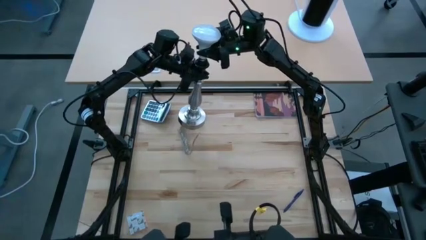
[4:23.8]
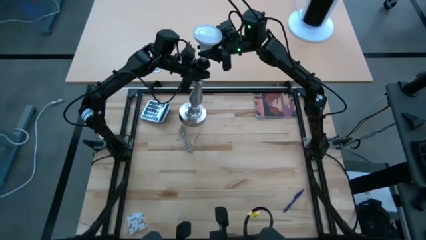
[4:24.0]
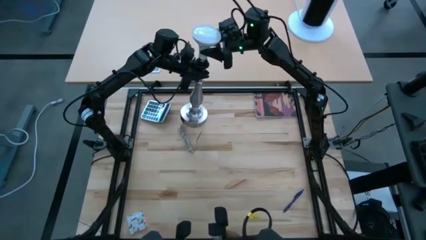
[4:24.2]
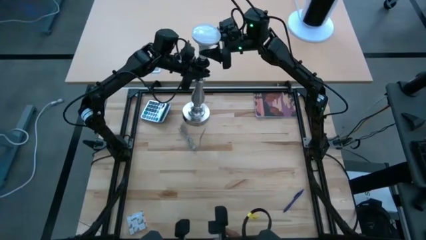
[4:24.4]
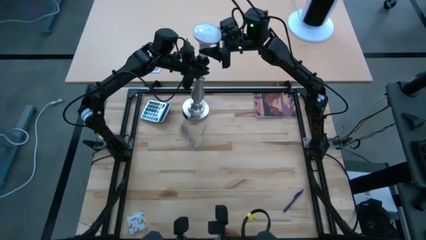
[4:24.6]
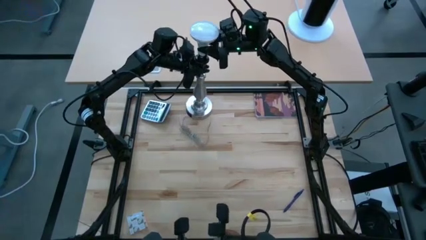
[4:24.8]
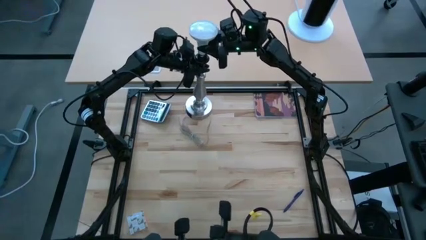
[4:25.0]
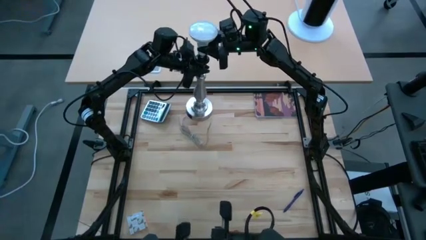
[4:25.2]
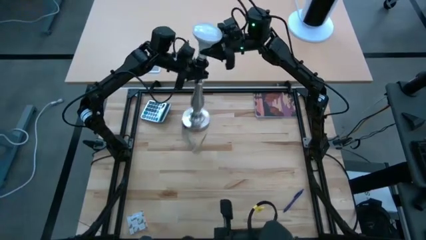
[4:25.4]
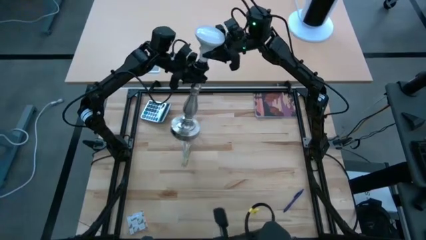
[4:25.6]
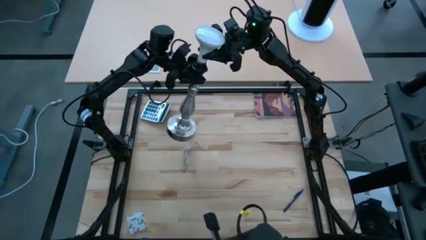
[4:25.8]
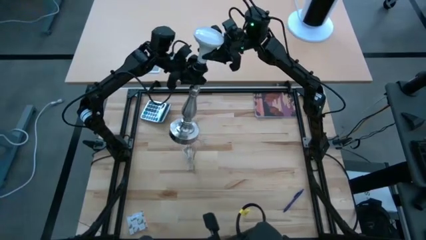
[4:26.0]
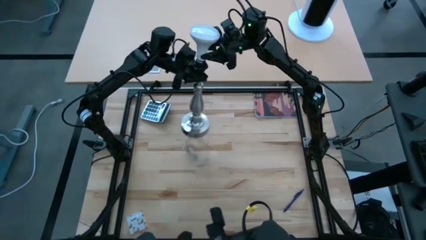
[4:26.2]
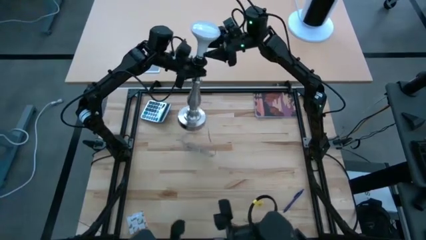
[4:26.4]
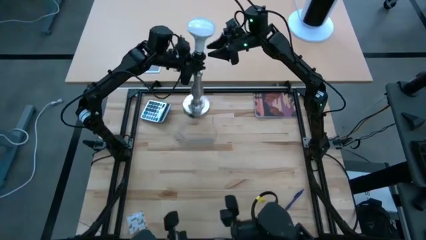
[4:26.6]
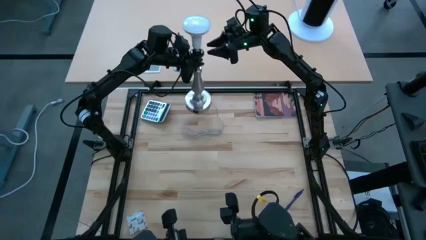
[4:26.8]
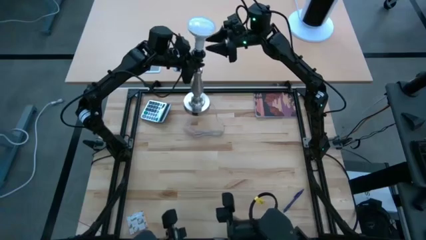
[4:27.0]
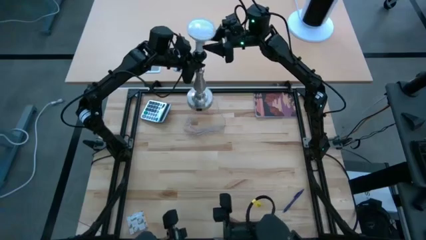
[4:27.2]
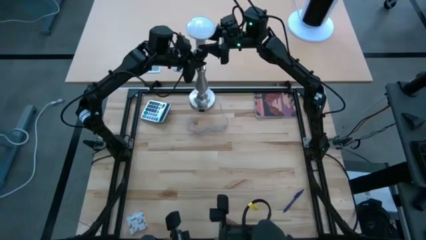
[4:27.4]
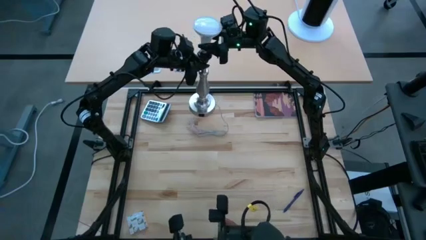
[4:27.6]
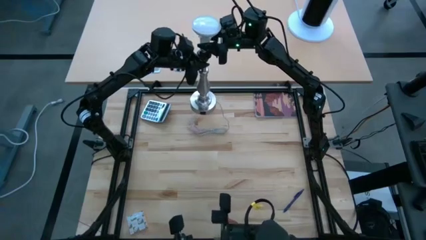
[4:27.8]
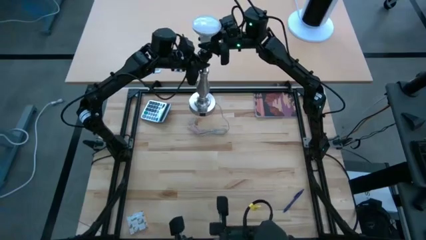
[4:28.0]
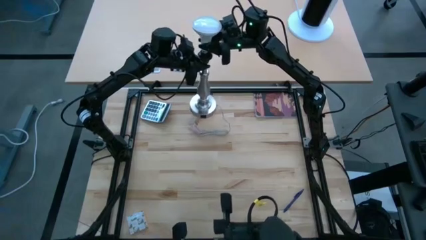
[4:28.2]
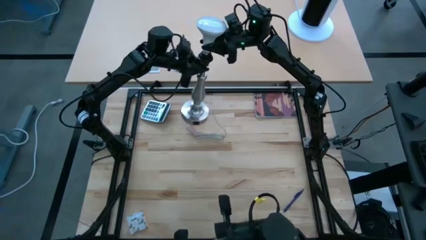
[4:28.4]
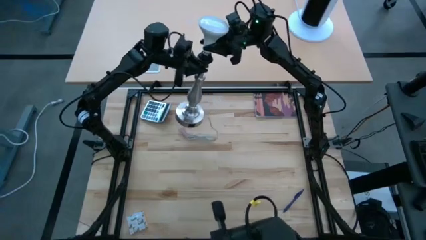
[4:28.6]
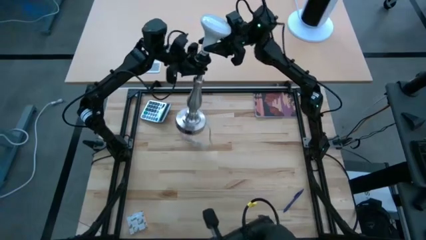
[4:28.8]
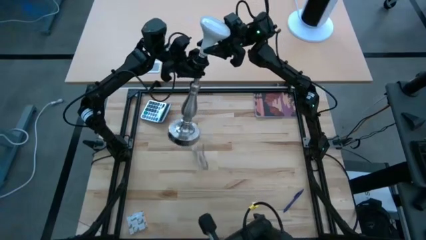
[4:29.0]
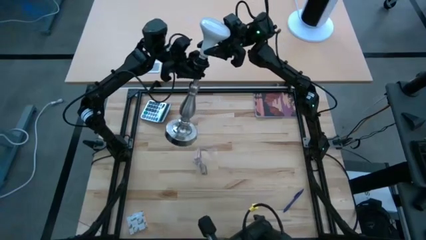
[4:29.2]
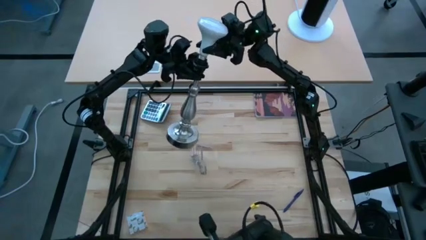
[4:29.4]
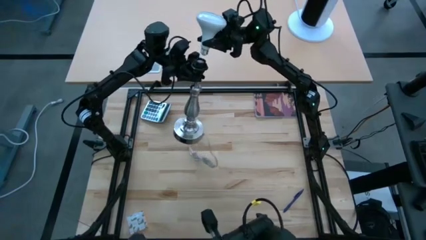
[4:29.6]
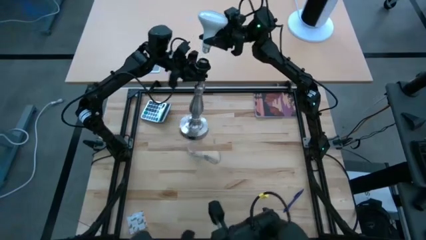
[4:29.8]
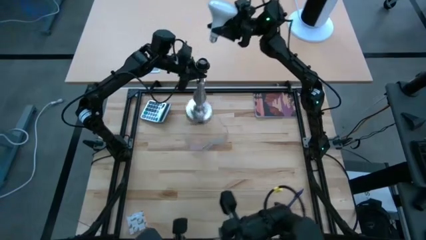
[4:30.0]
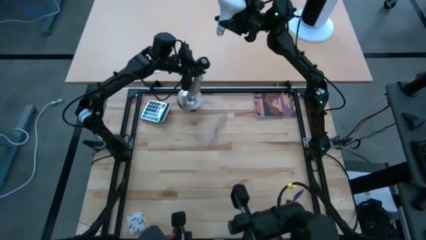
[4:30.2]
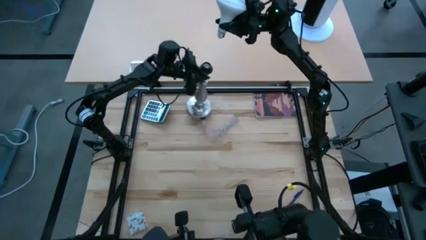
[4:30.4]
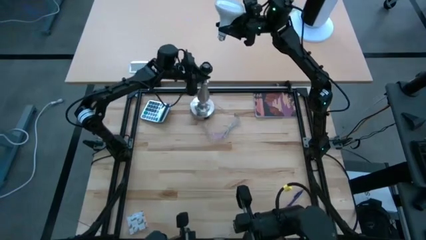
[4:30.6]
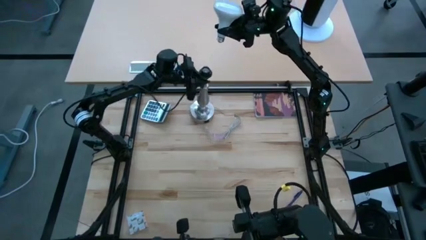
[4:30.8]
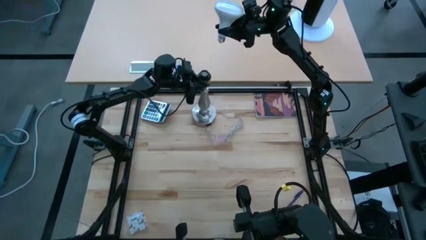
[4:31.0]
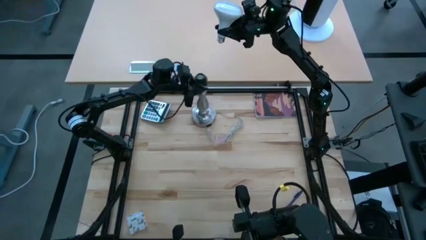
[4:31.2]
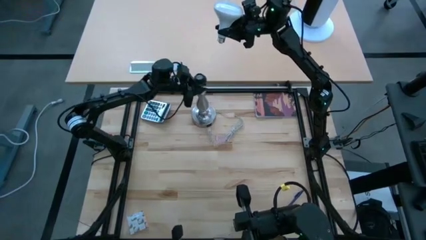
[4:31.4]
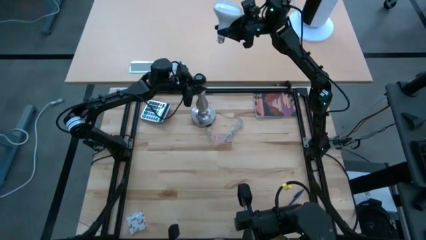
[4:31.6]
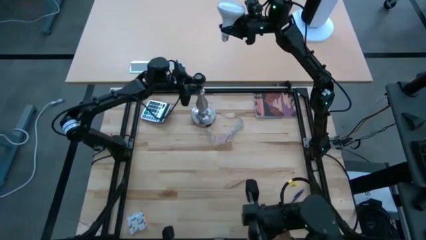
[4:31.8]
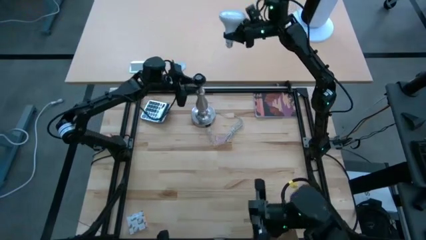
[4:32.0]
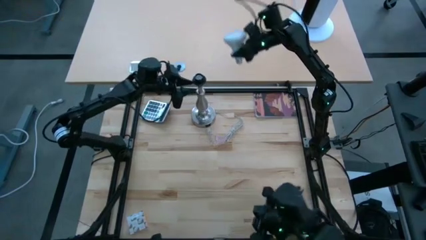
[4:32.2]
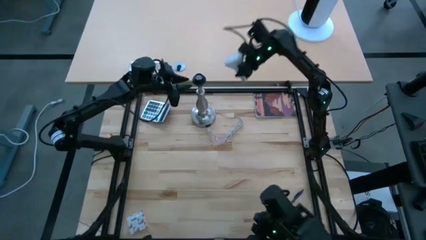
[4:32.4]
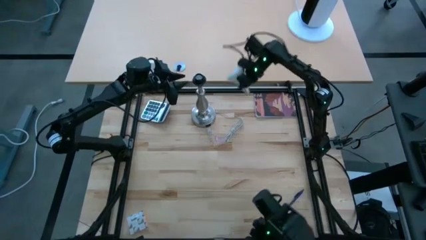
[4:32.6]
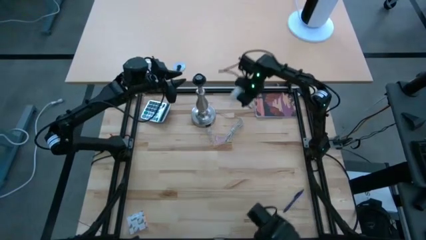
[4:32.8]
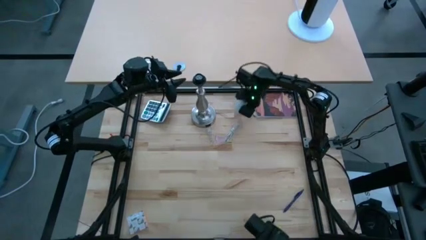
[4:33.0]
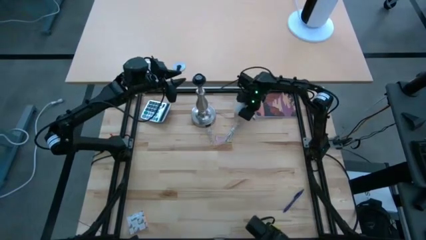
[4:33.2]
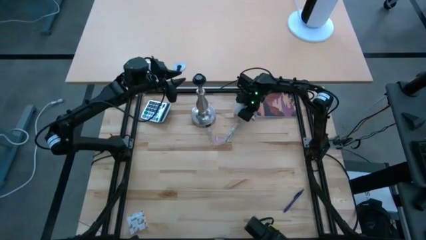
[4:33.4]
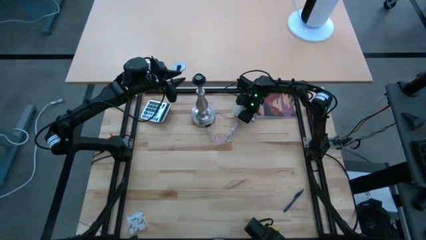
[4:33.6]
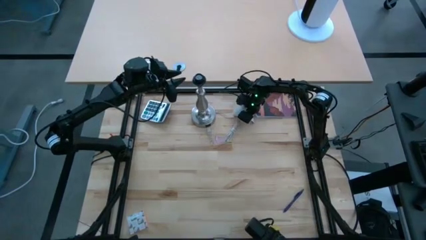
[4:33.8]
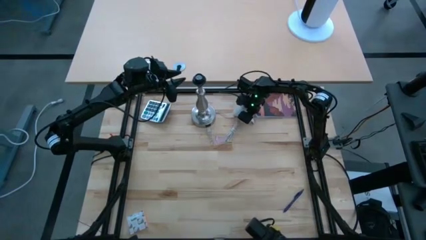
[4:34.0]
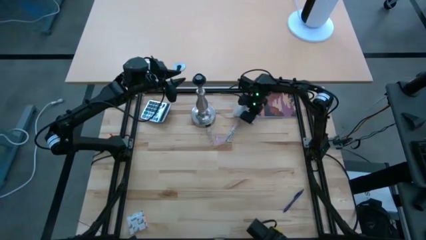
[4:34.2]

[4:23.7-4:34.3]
Task: Screw lightbulb
Remove the lightbulb from the table lamp

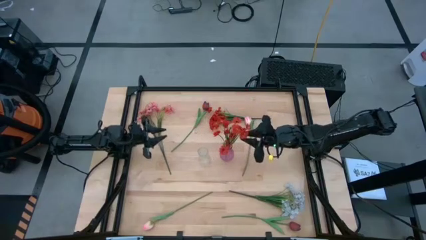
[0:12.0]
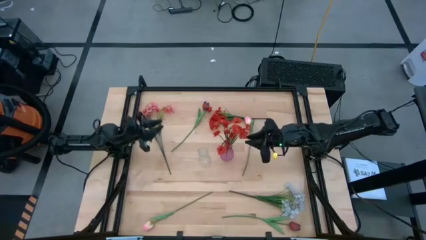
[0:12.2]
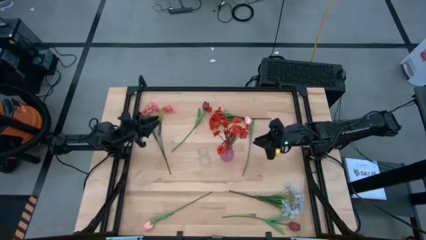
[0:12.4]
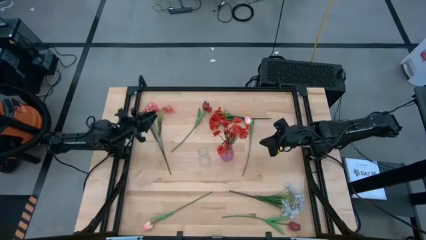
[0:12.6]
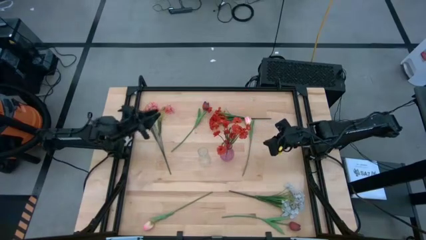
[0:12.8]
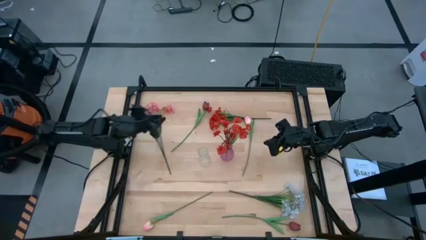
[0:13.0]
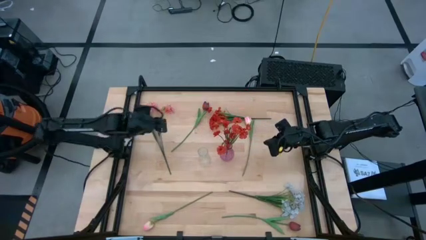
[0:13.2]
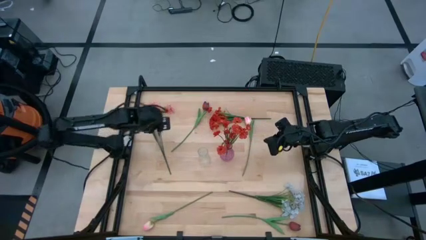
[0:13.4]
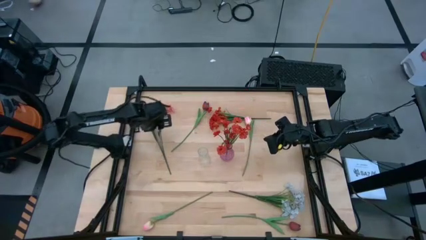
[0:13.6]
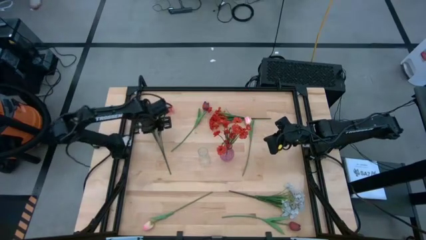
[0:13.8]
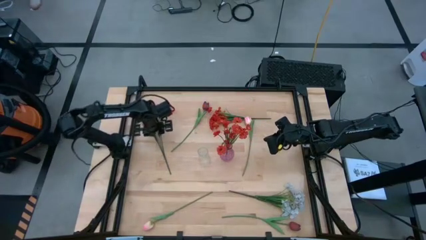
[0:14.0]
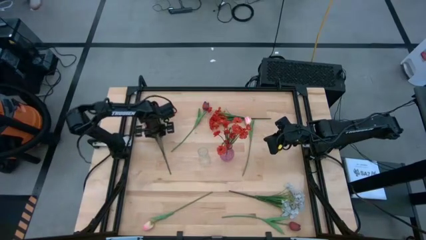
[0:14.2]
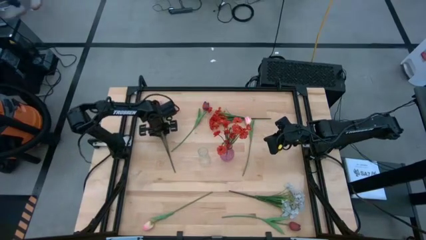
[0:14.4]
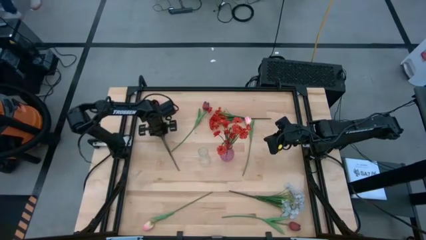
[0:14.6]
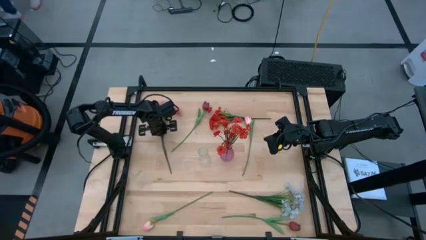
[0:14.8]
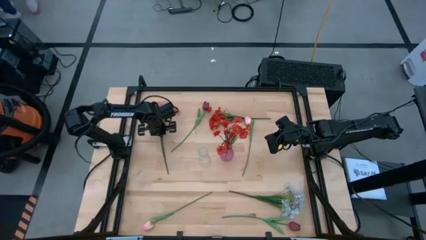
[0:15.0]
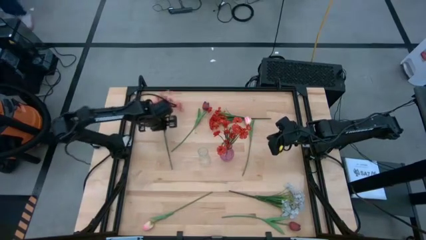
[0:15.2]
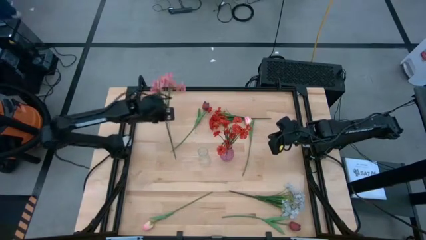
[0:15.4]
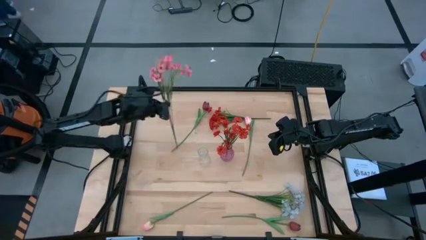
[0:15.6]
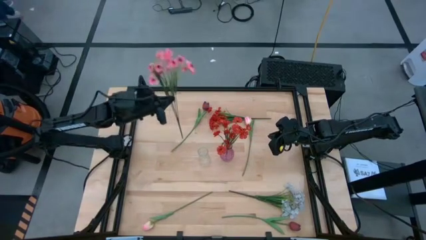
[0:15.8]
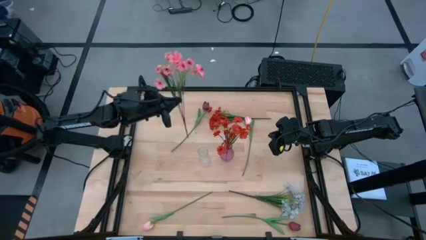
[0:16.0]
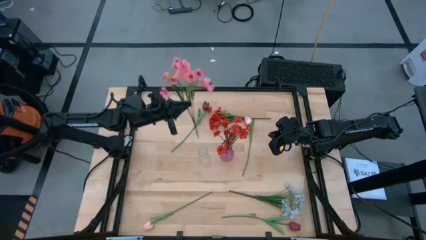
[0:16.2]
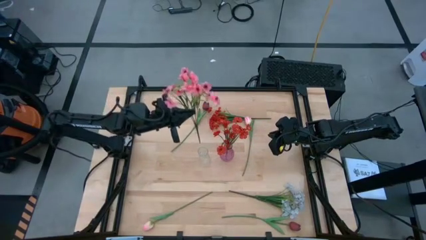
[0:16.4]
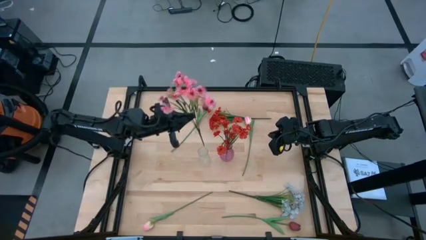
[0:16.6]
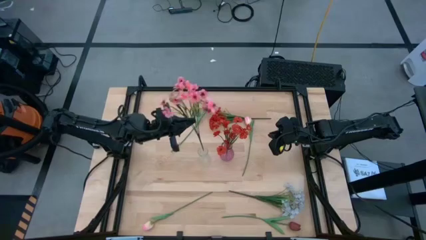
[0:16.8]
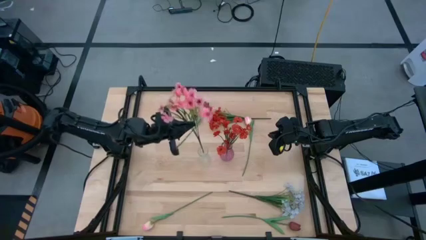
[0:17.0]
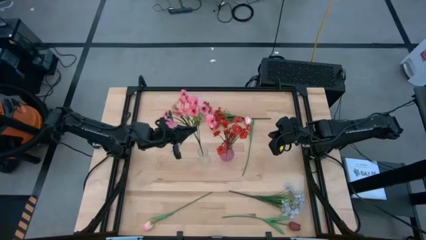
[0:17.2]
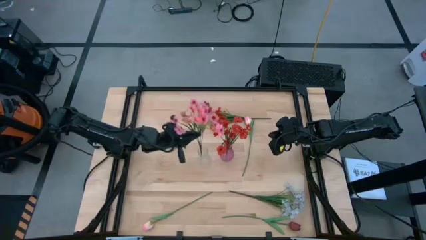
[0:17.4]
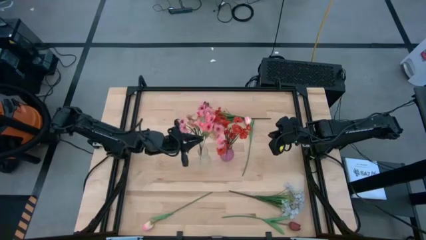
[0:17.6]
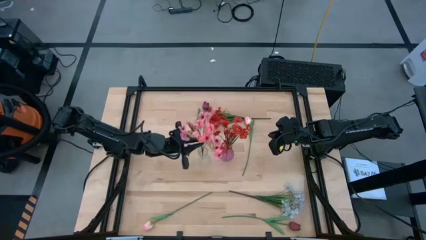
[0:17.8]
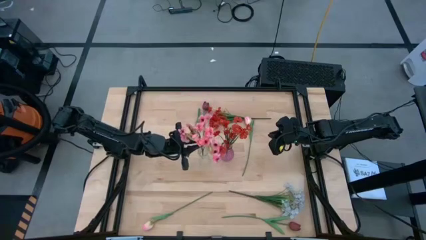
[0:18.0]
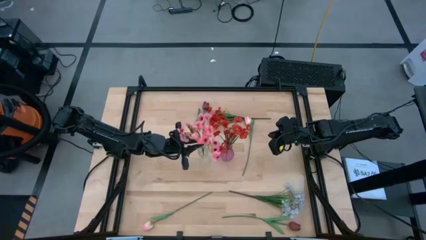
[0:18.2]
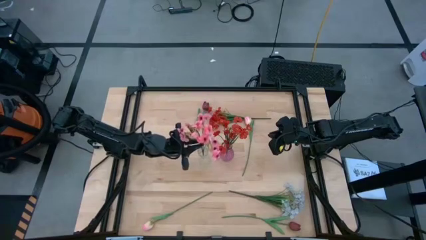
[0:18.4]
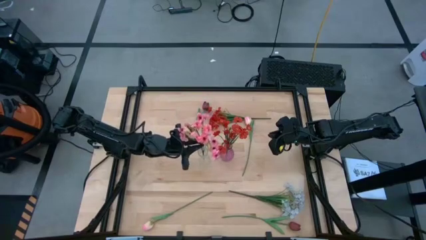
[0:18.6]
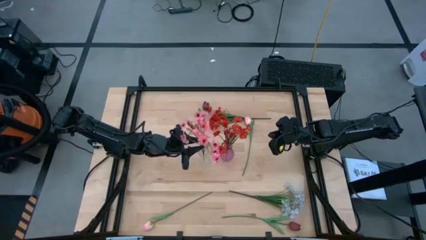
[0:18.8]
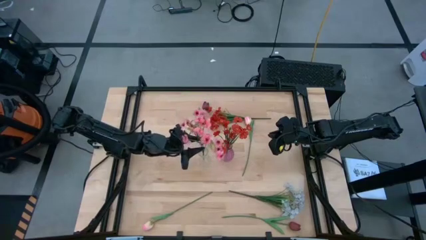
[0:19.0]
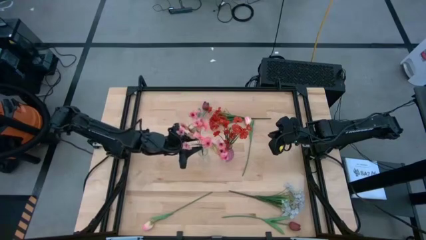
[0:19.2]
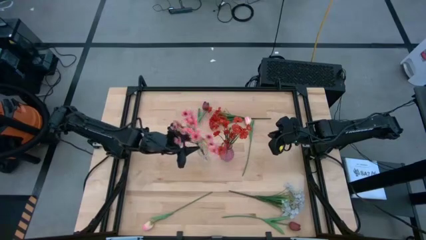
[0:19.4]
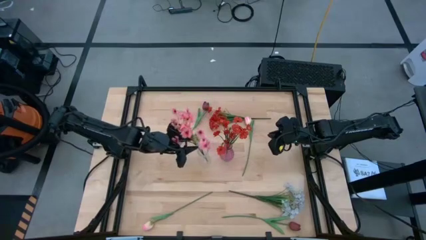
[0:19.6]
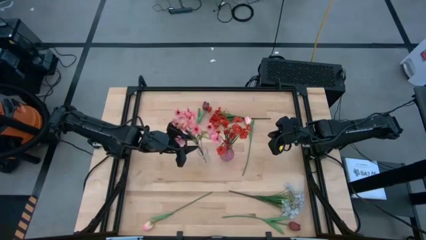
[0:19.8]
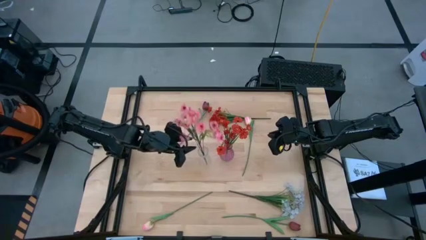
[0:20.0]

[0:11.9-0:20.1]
Task: Sort flowers into vase by color
Put the pink flowers into the transparent vase
